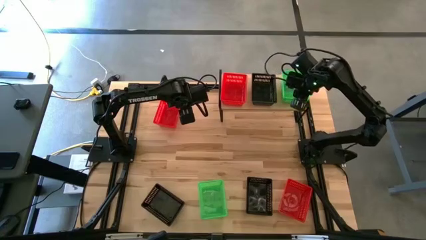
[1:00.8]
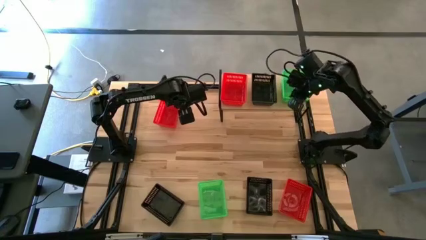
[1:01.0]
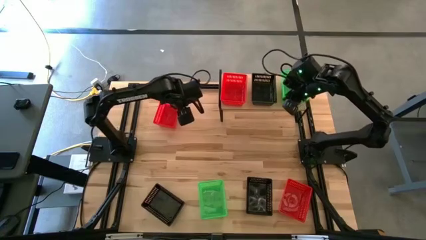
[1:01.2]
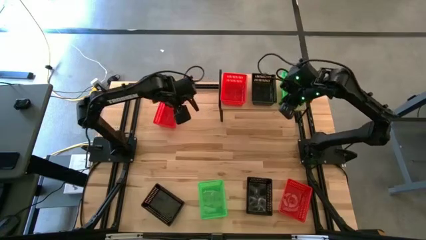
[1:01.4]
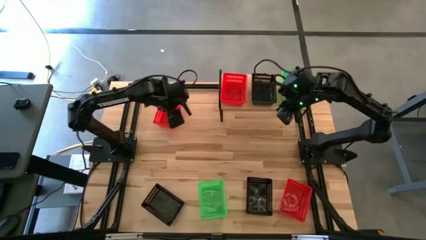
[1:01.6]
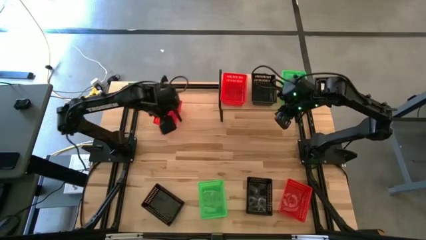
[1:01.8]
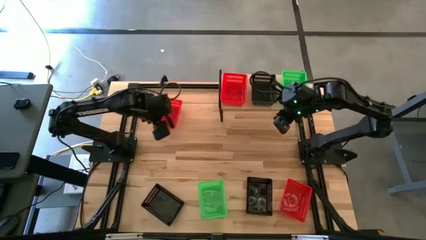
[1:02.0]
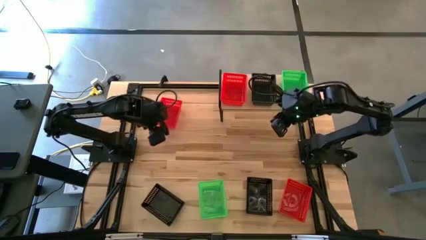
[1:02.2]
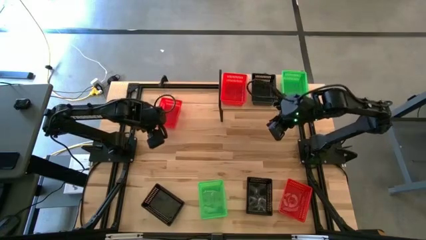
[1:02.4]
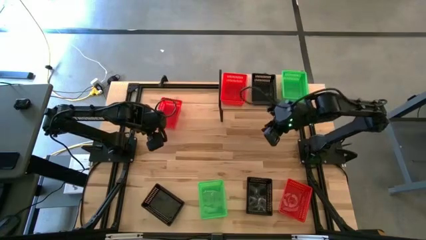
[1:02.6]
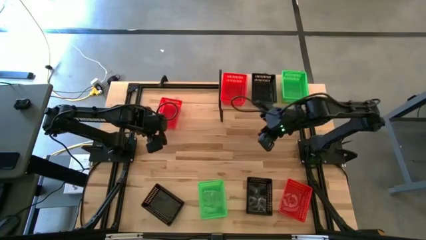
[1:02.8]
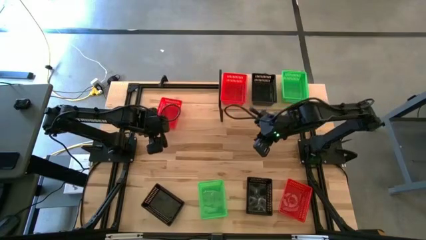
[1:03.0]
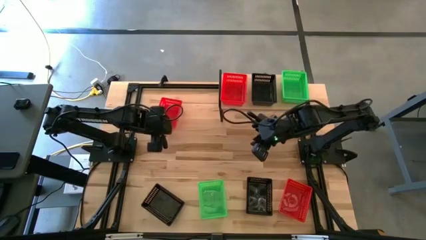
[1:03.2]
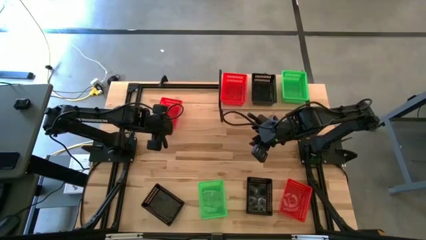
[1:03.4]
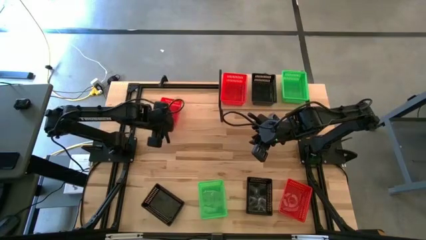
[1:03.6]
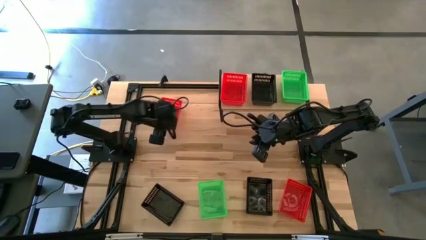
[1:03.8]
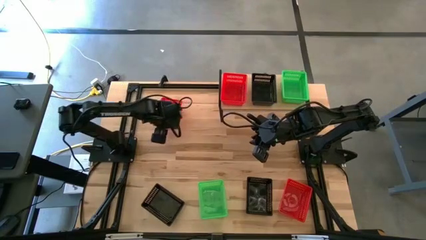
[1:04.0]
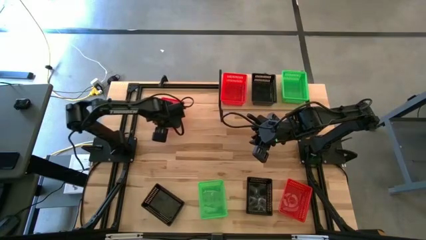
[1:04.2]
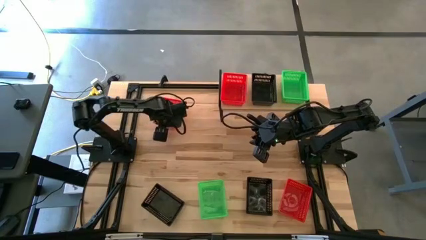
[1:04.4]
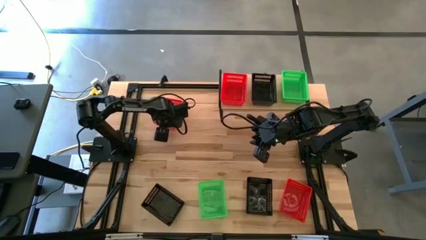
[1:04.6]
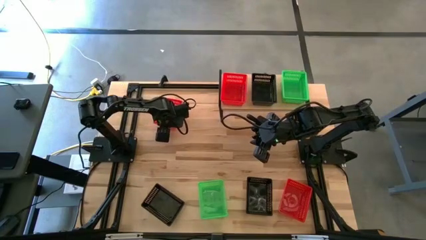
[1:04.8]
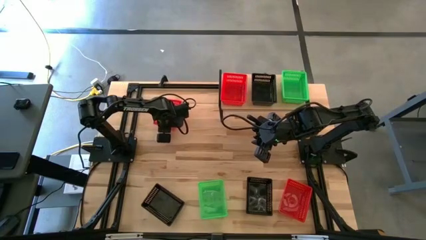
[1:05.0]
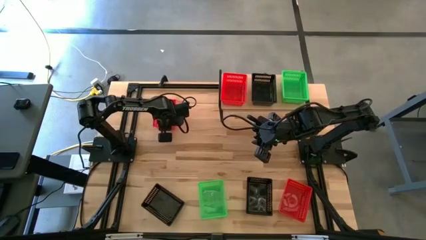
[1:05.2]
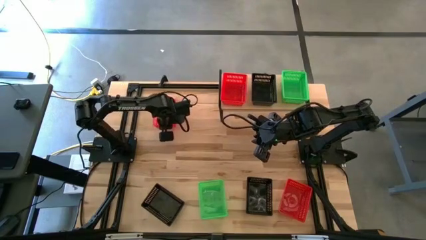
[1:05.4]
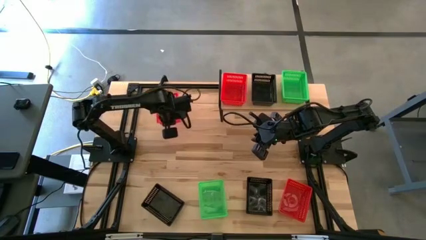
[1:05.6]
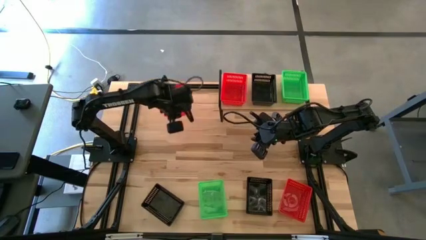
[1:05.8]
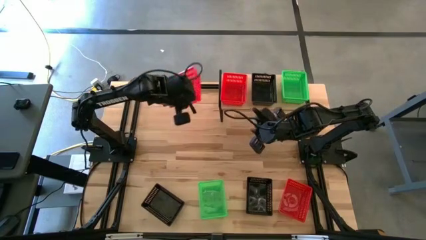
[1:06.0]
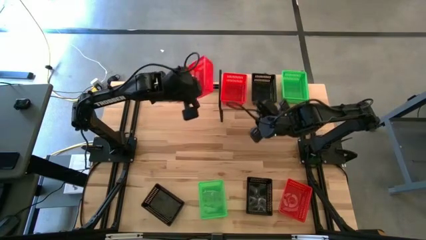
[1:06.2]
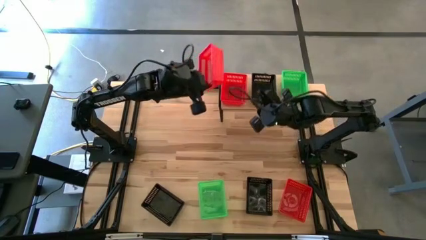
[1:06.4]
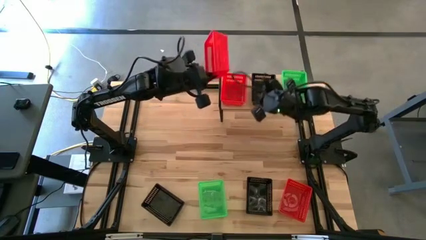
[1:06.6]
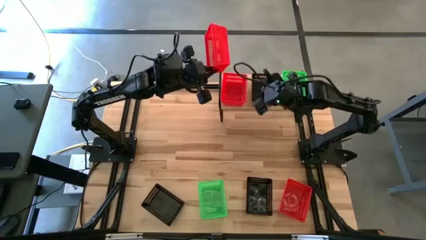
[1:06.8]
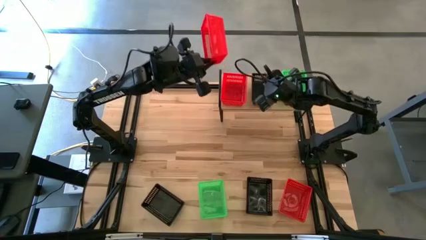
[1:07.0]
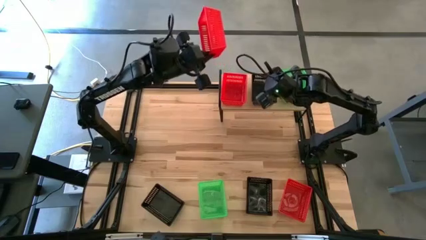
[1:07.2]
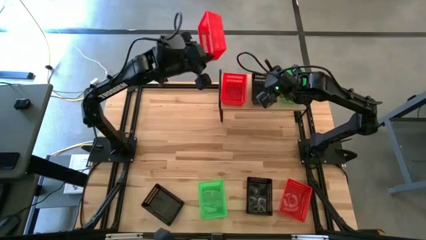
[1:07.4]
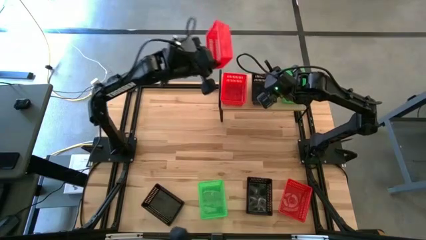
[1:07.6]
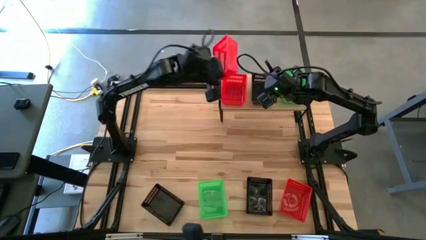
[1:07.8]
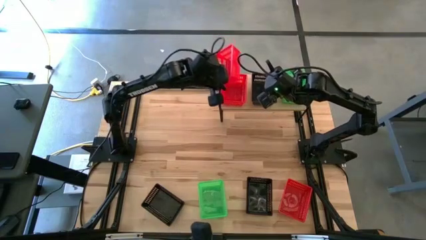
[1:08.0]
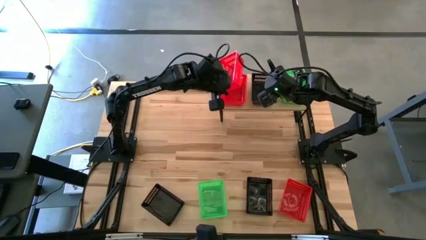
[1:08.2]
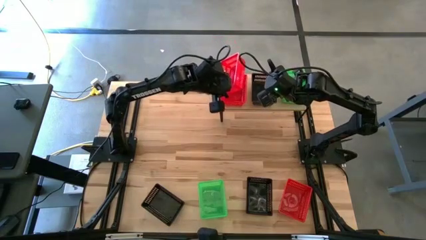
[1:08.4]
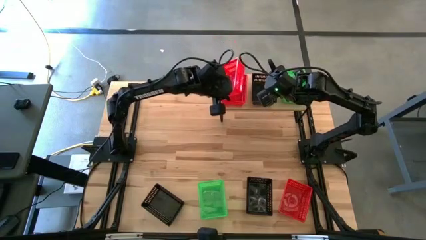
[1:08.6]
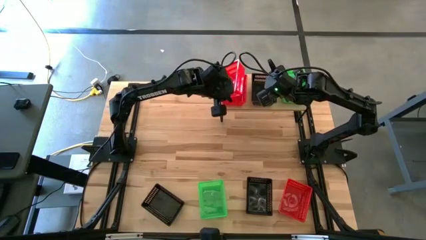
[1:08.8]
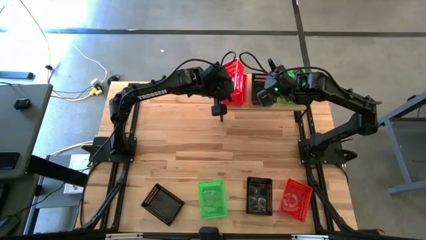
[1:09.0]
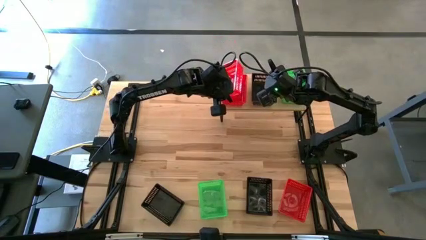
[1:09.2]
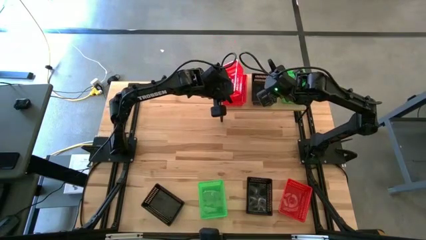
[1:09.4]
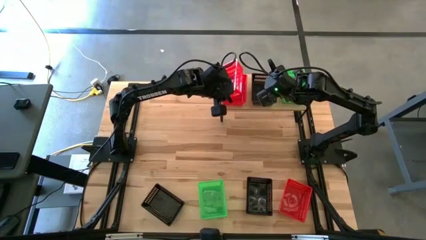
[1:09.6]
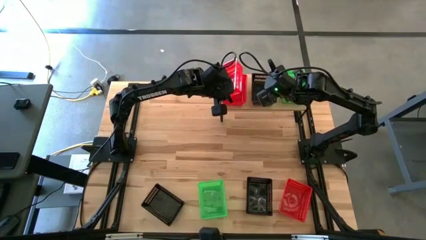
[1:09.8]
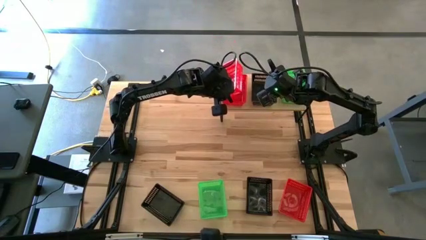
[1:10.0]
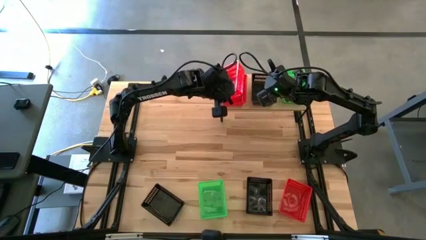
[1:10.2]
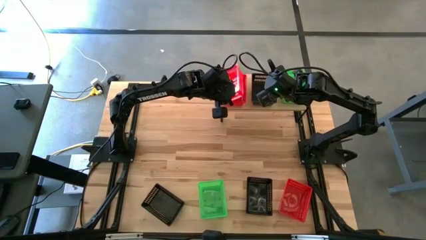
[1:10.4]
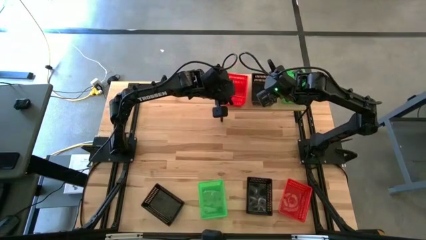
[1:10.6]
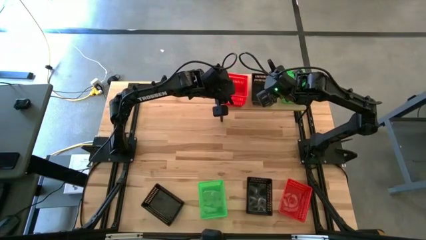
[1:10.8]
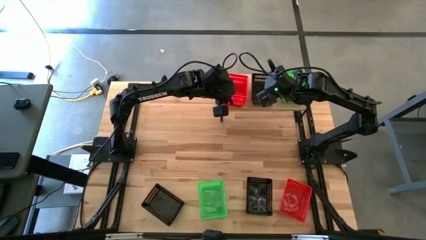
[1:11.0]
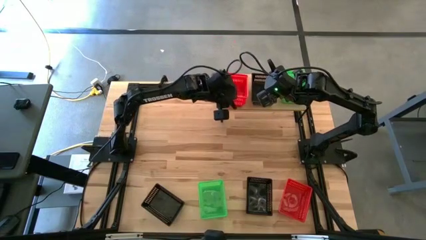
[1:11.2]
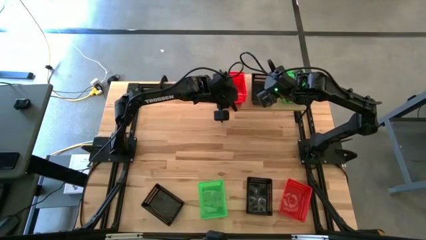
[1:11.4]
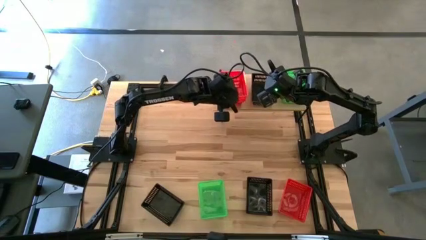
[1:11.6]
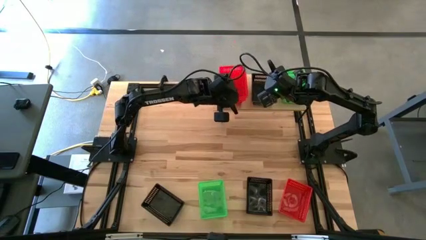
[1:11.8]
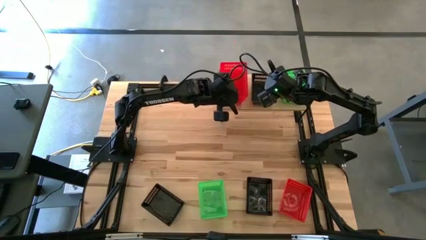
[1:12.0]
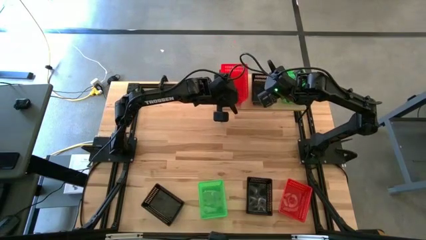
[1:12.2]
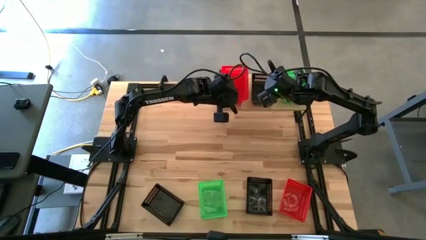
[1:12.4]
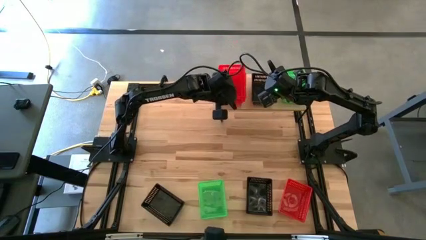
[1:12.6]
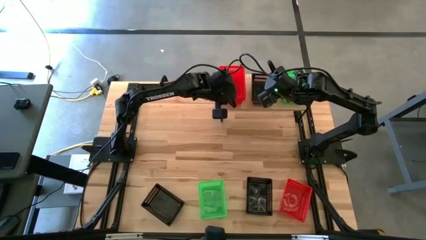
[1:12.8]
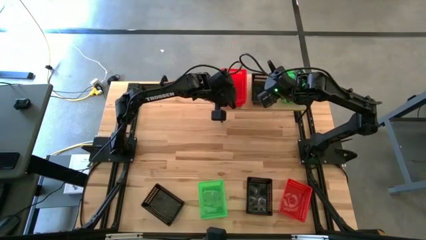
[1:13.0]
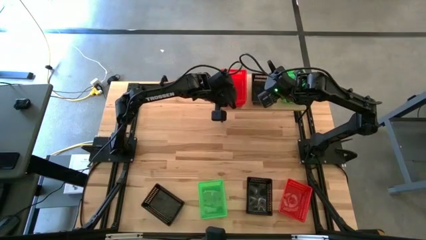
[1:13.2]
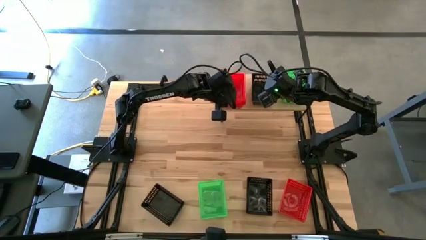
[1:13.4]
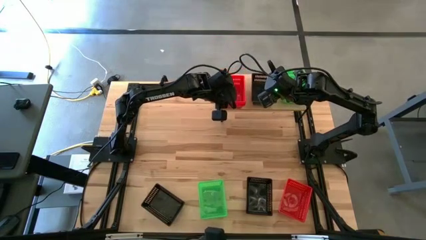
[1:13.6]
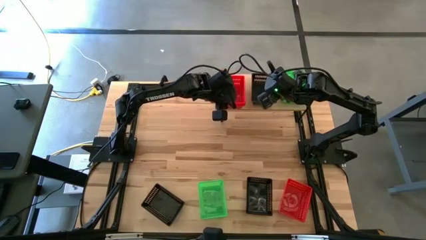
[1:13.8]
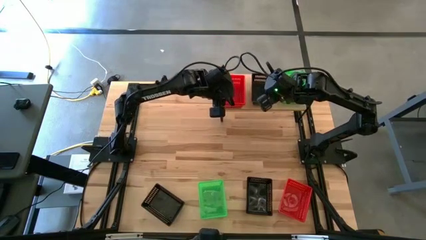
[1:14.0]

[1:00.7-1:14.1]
Task: Stack baskets on shelf by color
Stack the top red basket on top of the other red basket on the shelf

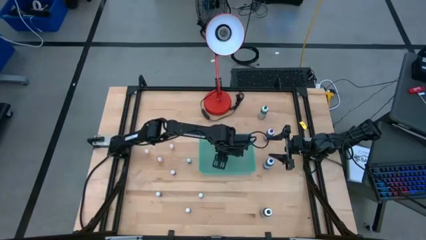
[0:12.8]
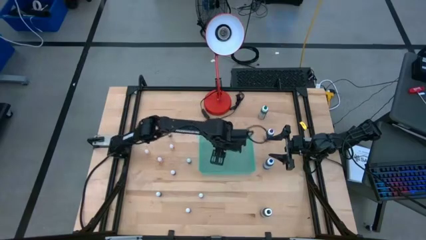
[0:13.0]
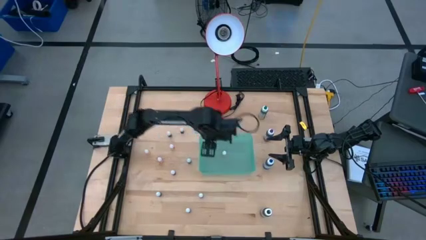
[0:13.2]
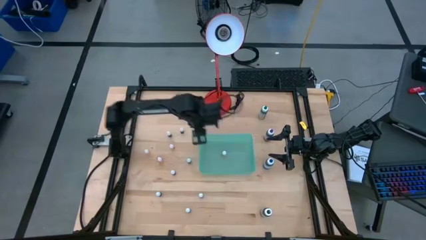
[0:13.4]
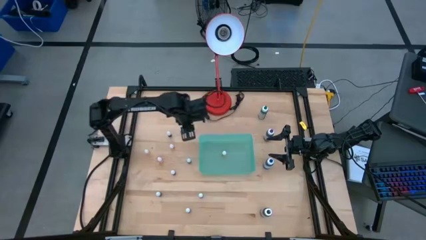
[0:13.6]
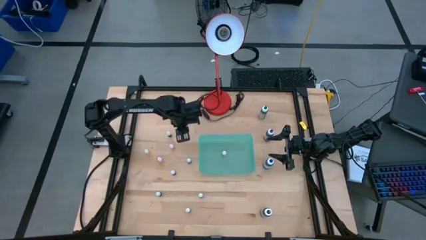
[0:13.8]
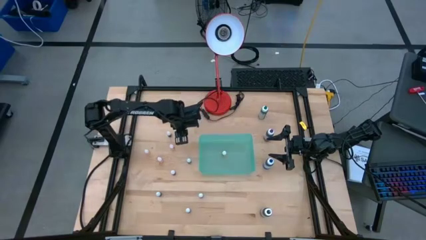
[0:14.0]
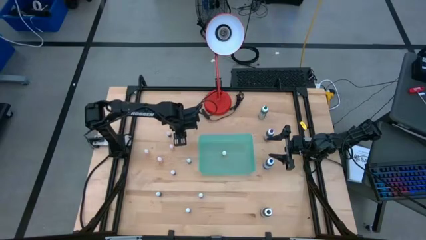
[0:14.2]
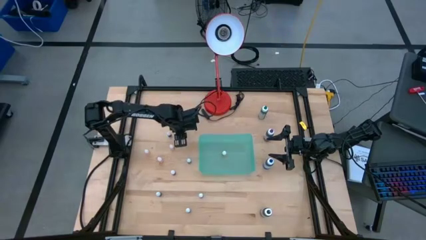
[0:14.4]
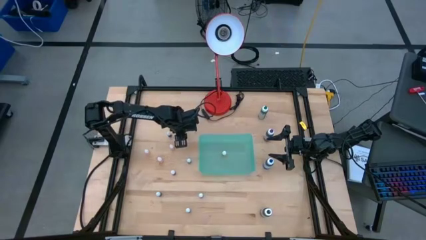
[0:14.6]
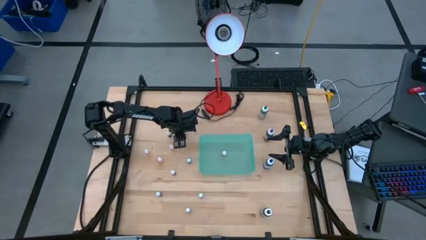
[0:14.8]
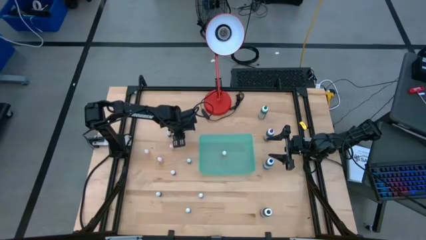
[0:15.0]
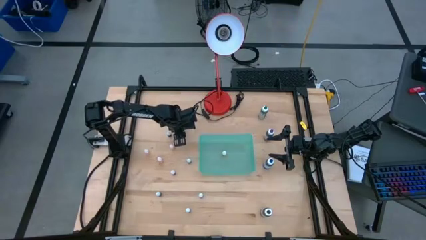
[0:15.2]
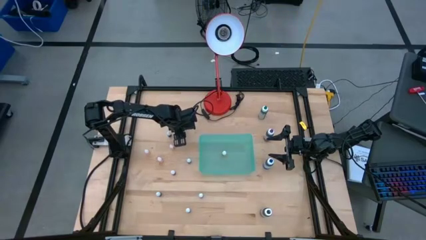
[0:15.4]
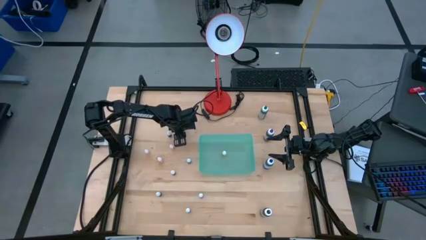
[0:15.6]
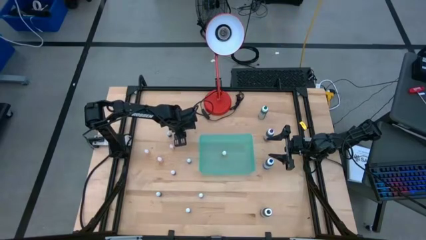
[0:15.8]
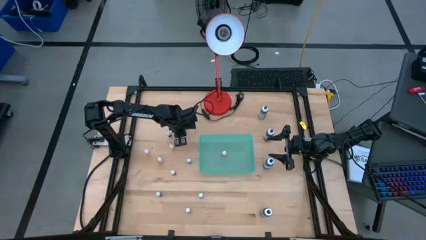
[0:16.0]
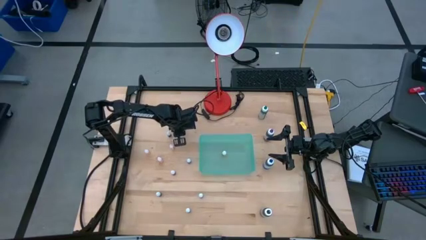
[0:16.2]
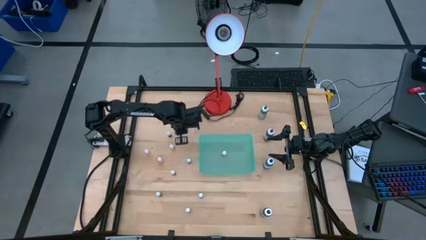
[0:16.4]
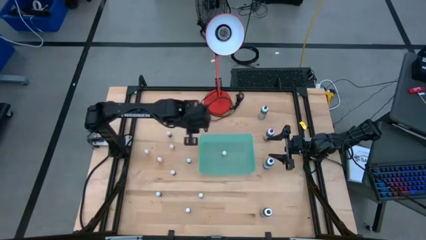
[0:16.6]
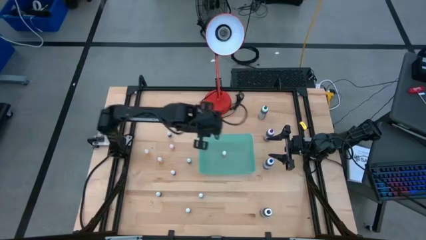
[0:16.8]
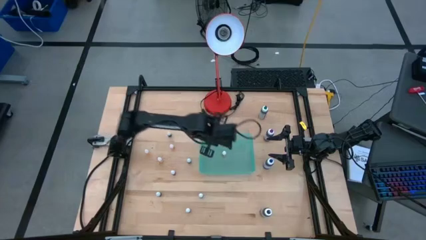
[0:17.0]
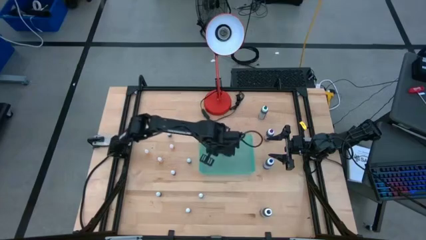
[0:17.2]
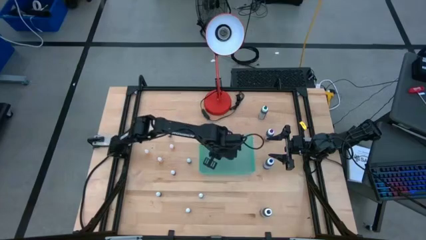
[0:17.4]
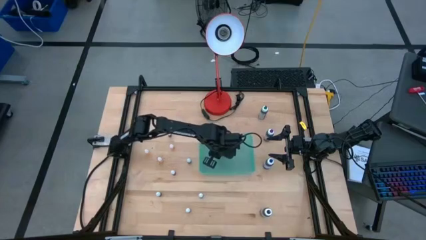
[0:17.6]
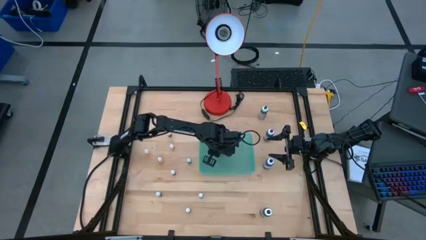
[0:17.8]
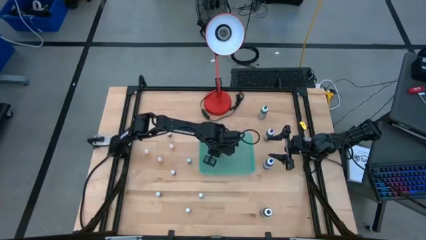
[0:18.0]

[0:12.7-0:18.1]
Task: Pick & Place food coloring
Put the small purple food coloring bottle into the green bin
